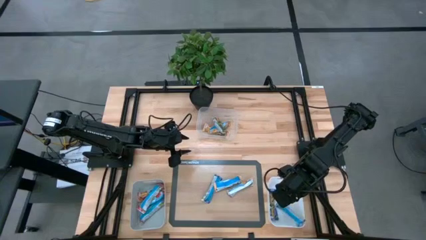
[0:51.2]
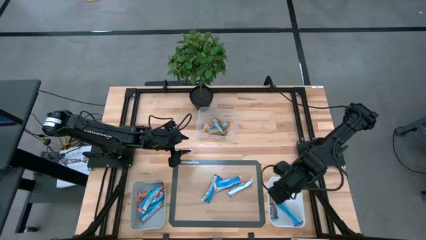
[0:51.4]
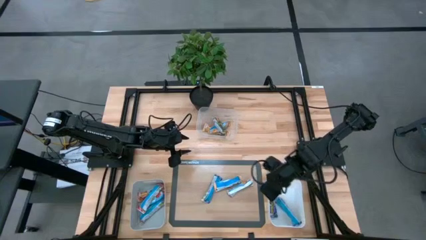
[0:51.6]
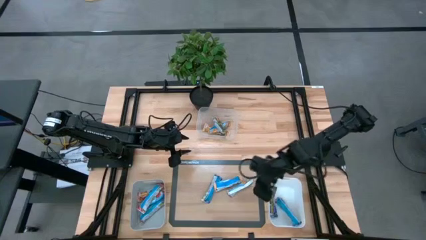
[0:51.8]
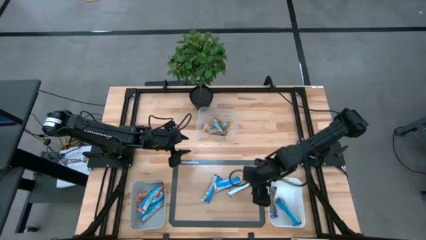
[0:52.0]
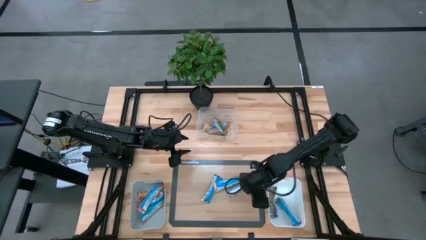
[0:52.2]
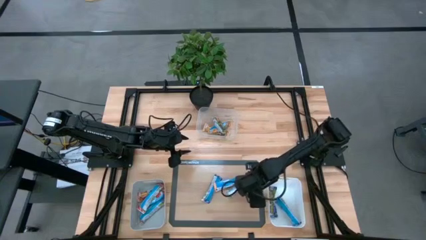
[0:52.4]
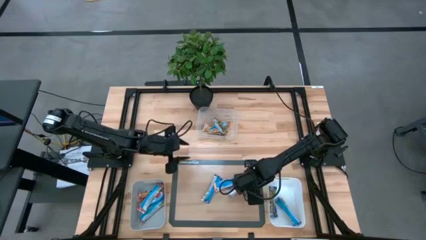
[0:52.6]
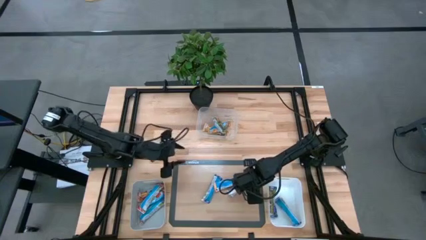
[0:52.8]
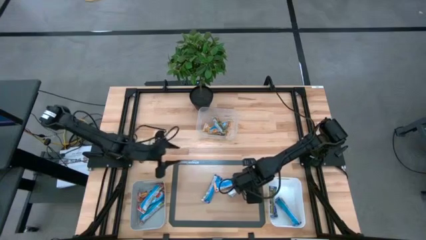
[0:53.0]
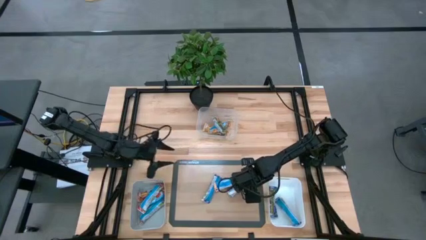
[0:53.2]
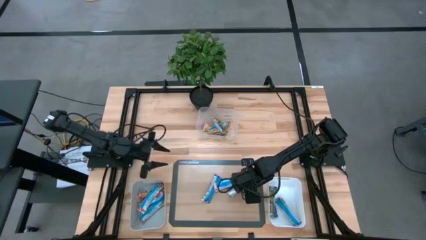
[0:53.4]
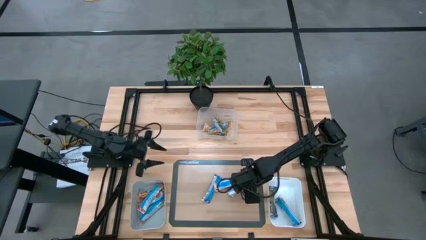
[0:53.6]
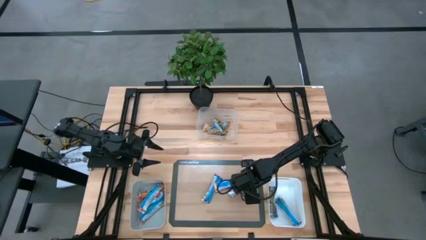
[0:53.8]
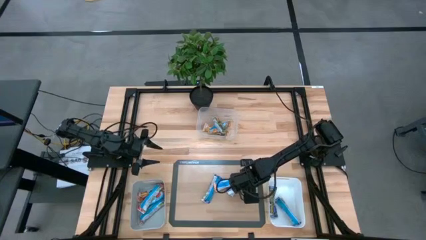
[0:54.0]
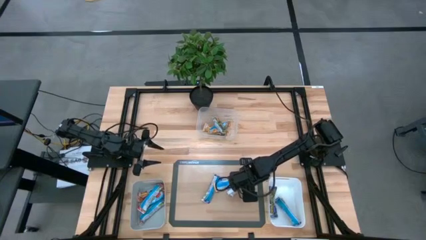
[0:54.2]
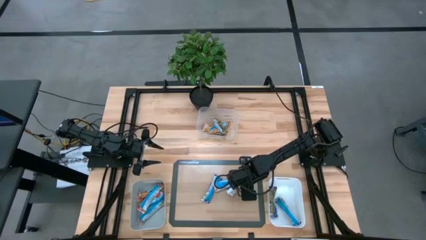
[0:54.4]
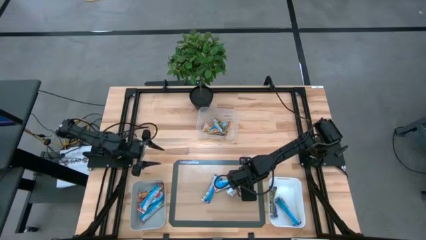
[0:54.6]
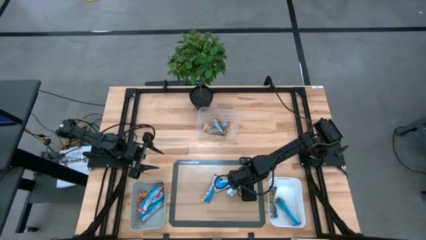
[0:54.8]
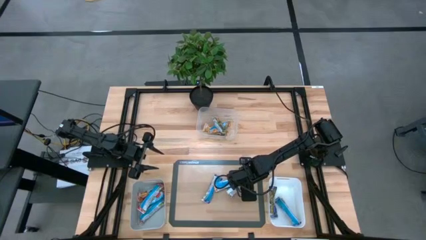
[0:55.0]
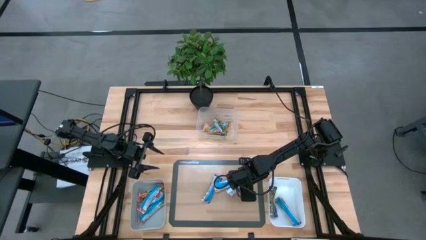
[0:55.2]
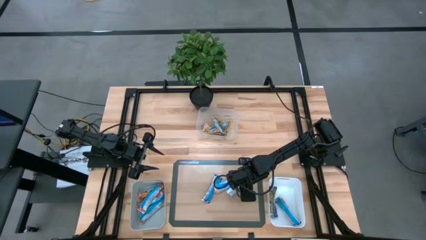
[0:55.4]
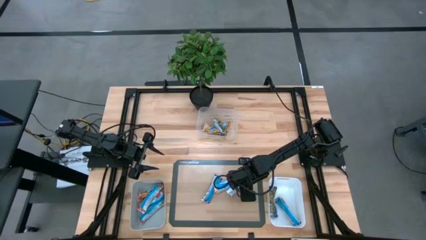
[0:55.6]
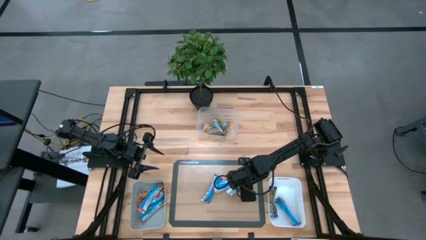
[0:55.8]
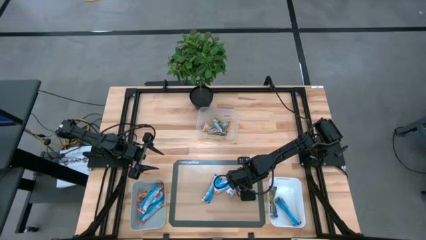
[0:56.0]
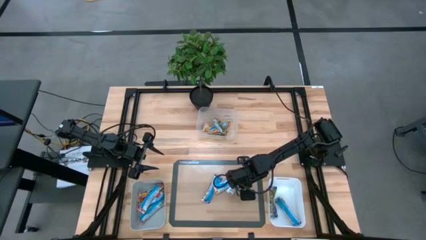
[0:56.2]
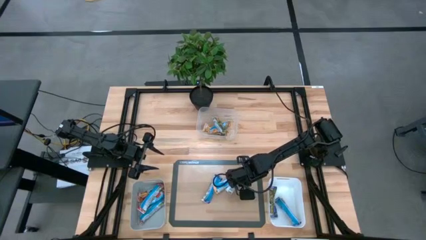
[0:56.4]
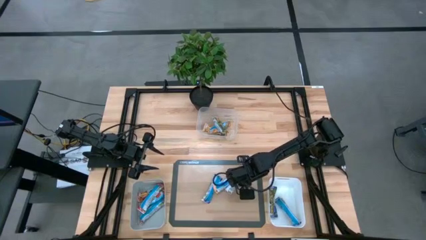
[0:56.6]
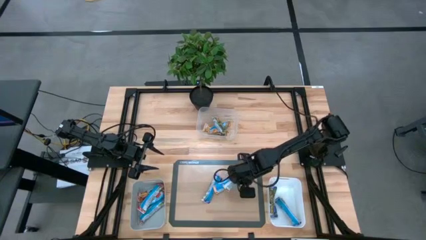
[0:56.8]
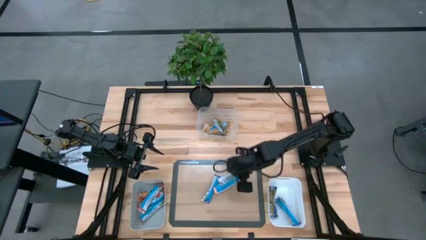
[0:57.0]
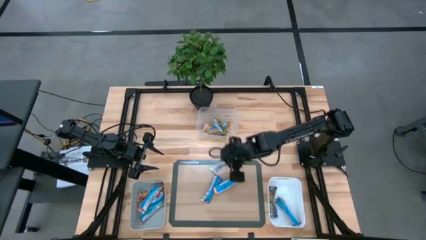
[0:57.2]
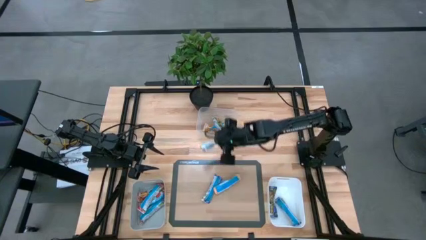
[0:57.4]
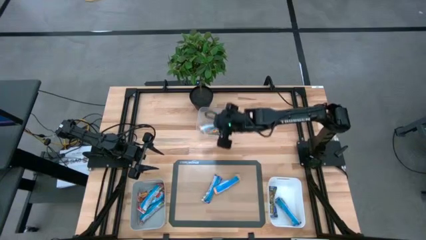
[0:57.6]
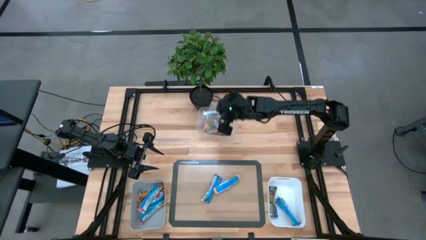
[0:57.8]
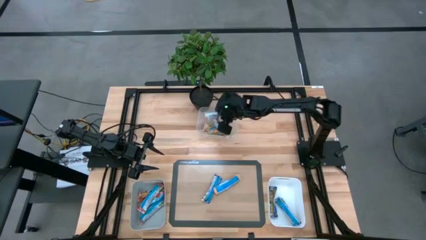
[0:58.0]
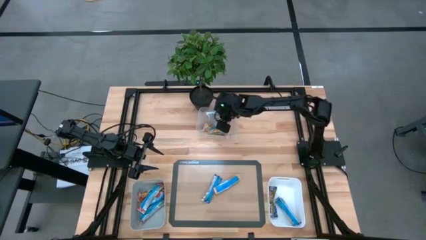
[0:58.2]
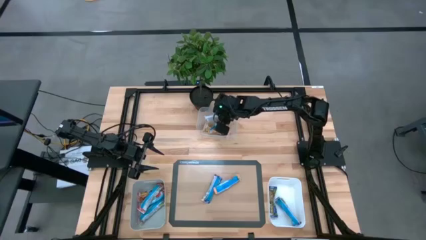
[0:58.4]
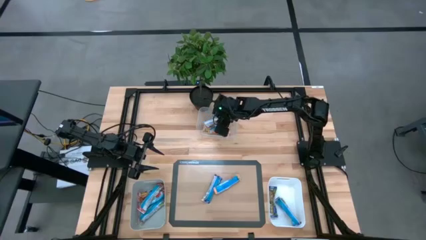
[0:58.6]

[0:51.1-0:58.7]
Task: Pick and place Granola Bars by type
Put the orange granola bar into the transparent bin

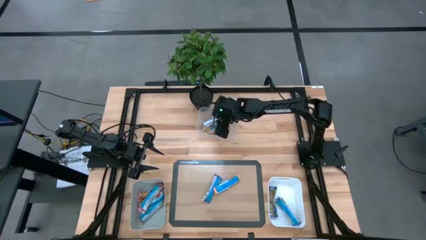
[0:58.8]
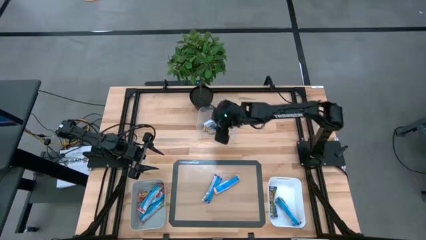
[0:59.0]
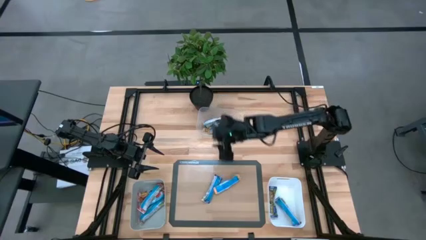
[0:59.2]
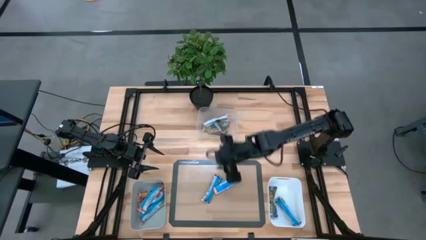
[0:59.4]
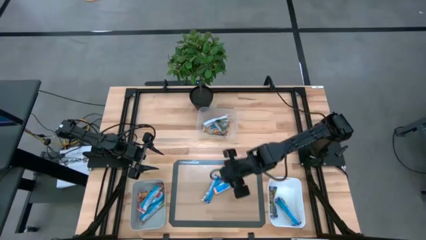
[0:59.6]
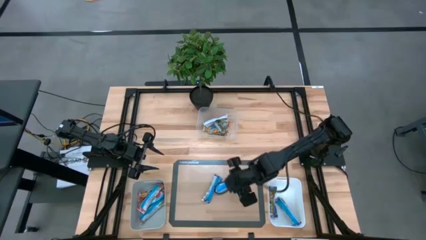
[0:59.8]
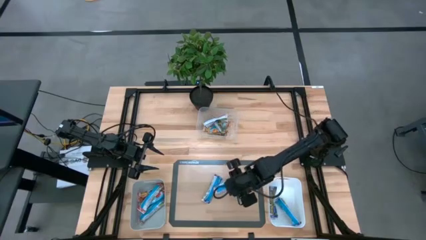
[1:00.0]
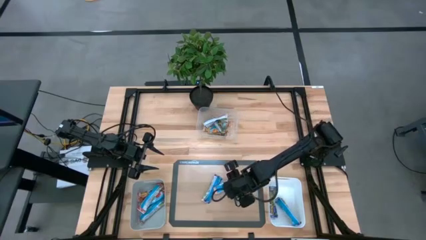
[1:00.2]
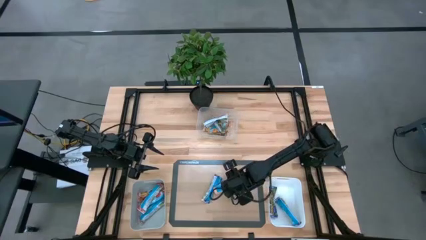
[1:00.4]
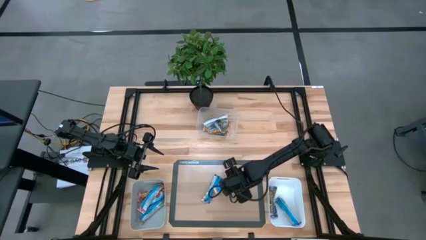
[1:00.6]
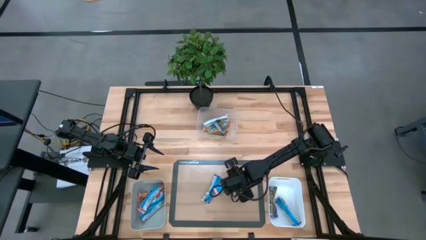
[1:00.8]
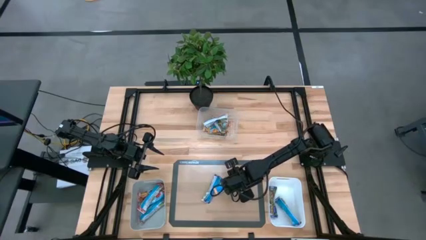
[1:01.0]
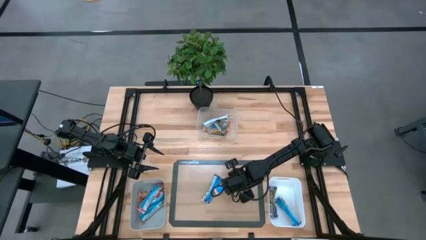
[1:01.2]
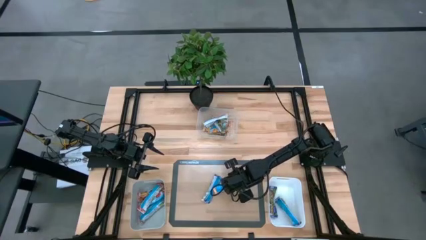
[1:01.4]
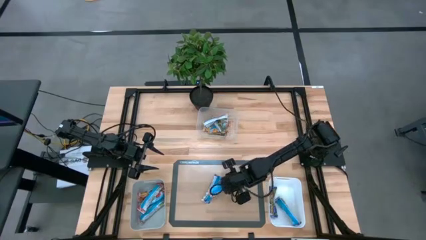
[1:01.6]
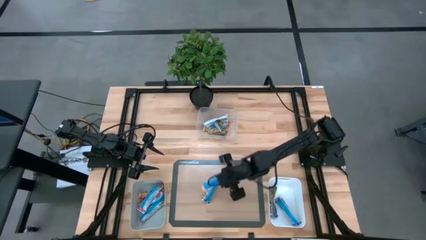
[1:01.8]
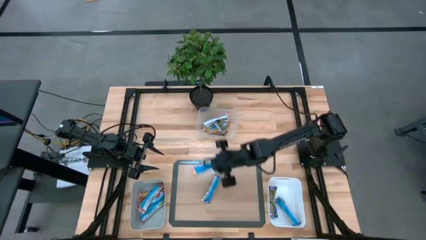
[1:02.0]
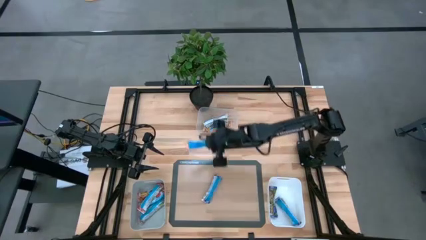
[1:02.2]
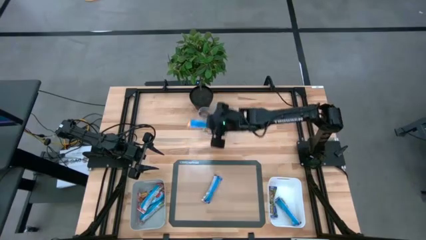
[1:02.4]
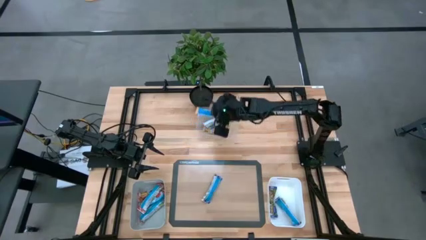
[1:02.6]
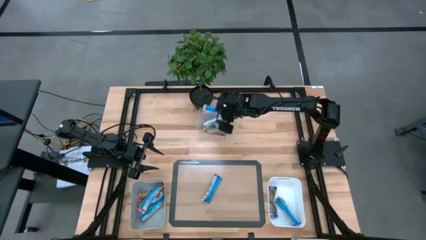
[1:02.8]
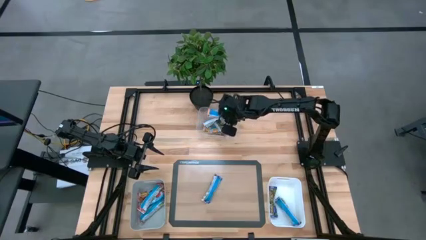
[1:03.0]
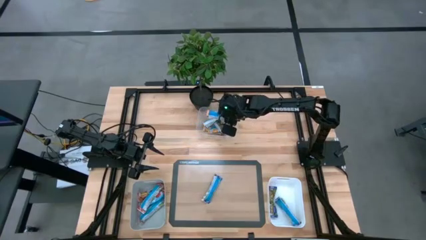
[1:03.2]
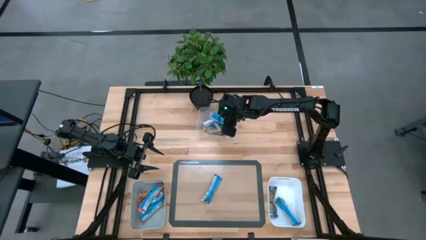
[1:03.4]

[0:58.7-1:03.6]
Put the orange granola bar into transparent bin

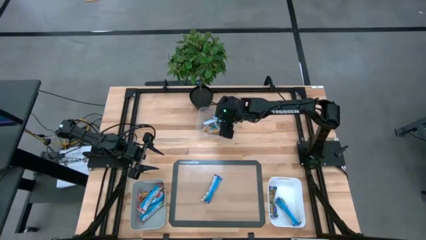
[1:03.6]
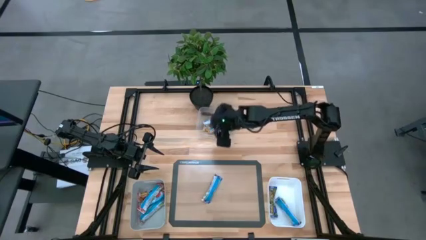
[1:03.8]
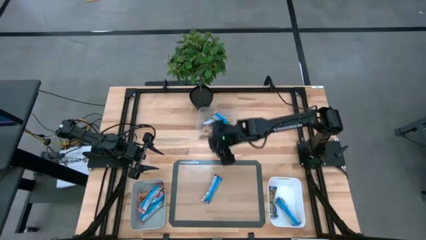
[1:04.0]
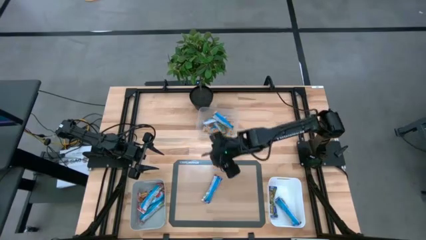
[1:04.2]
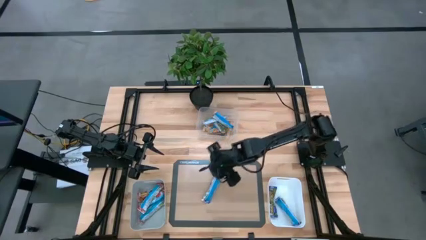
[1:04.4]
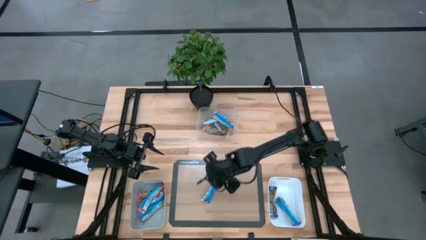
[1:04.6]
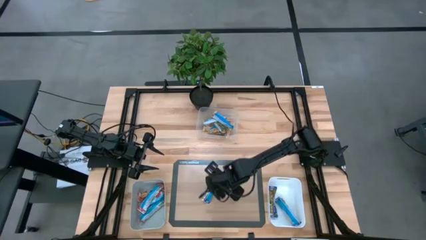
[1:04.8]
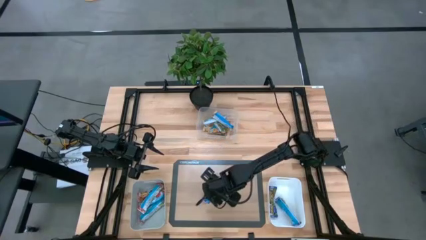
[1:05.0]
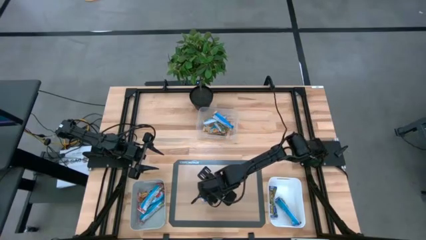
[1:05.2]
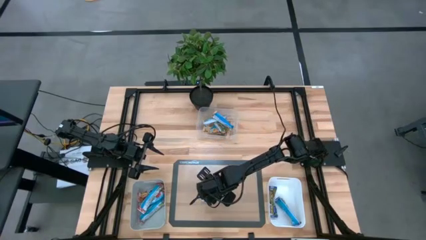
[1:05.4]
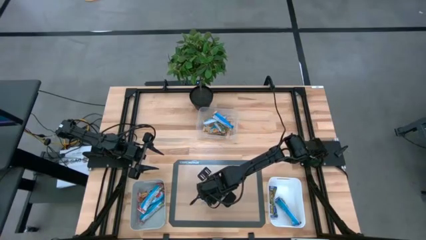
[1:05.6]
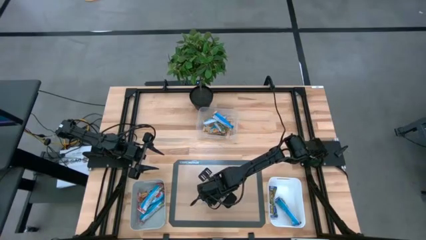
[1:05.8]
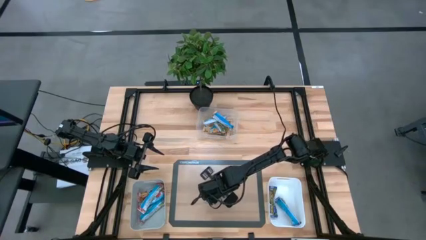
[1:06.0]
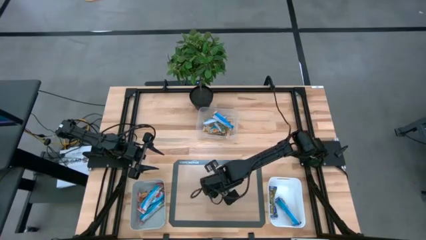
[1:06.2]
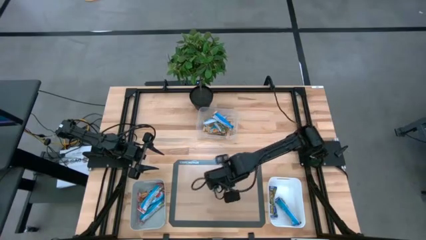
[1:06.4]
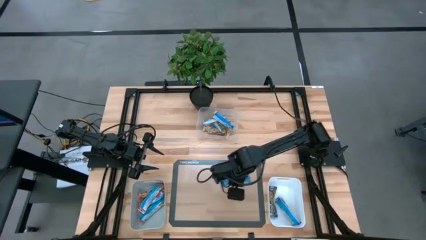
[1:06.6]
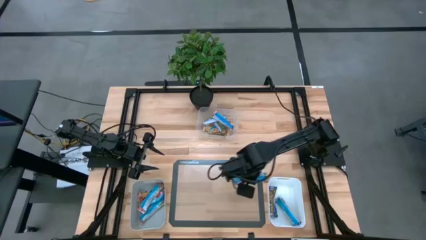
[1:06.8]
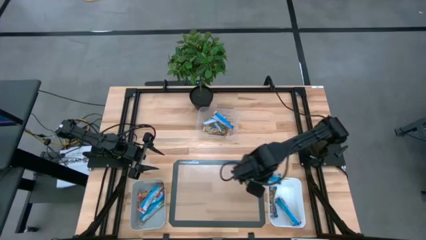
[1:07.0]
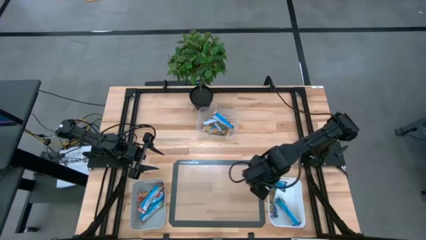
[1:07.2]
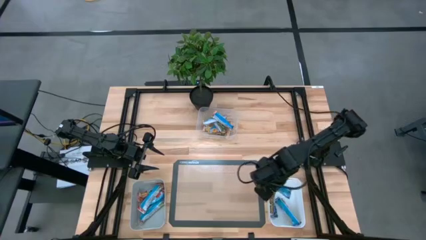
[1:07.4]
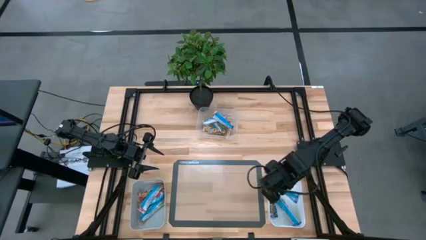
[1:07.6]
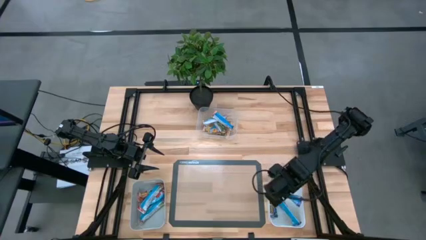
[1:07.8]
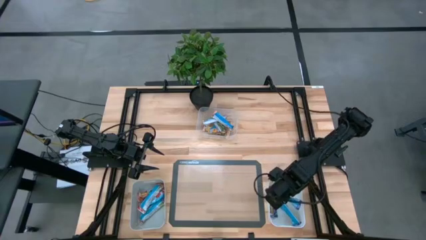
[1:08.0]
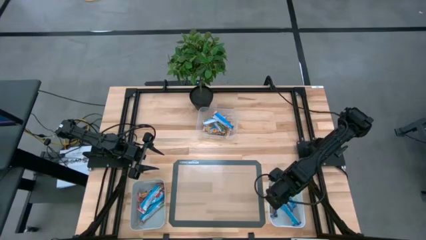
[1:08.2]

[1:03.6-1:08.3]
Put the violet granola bar into the white bin
